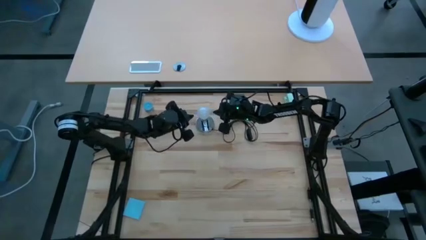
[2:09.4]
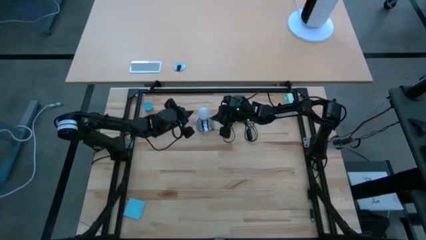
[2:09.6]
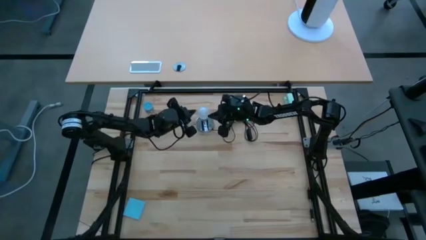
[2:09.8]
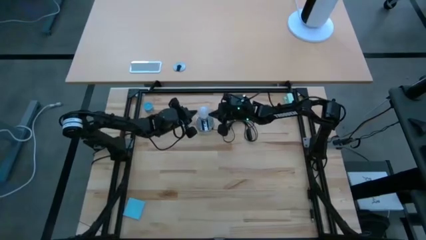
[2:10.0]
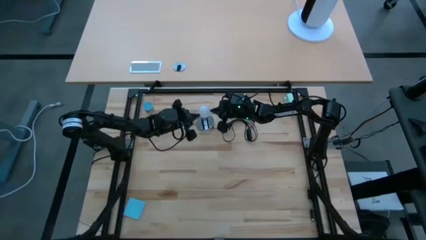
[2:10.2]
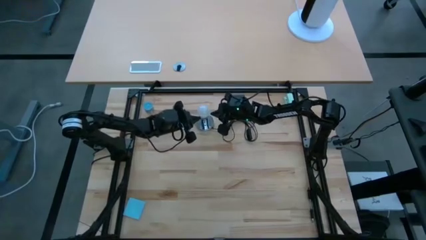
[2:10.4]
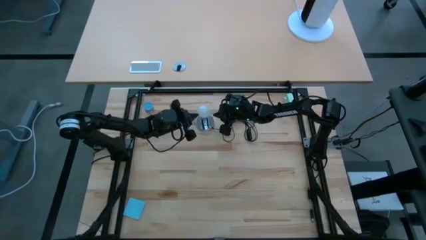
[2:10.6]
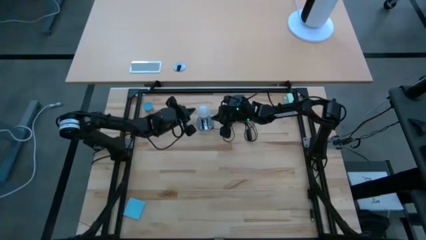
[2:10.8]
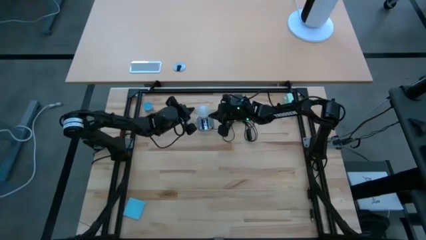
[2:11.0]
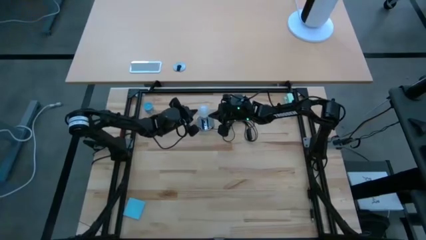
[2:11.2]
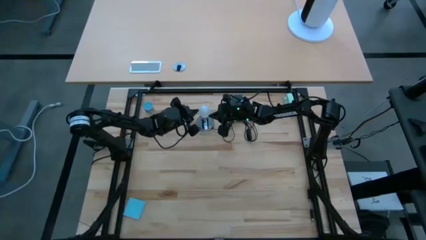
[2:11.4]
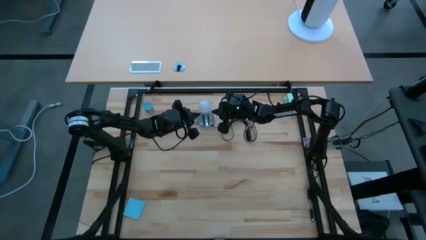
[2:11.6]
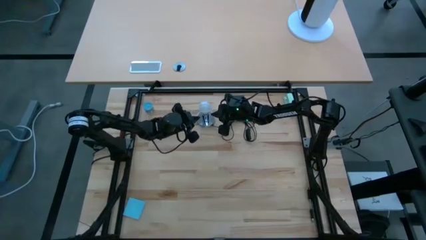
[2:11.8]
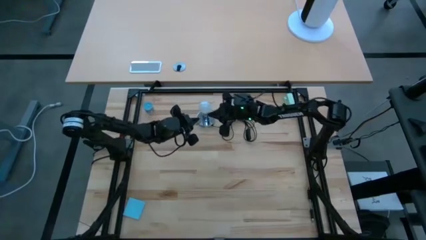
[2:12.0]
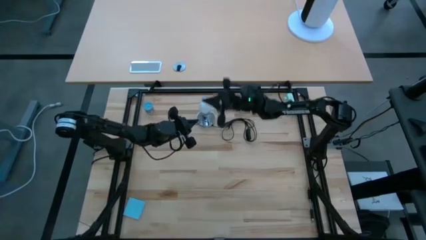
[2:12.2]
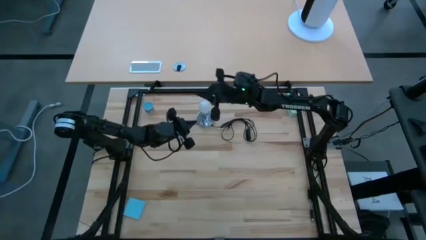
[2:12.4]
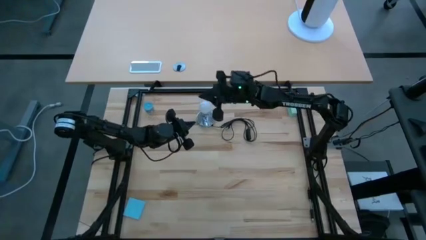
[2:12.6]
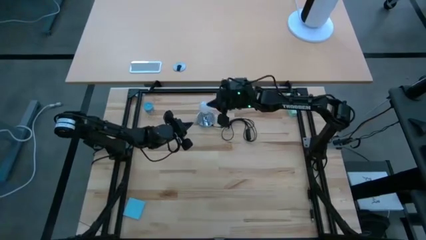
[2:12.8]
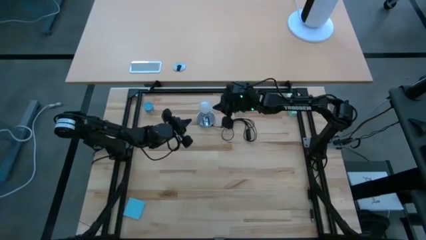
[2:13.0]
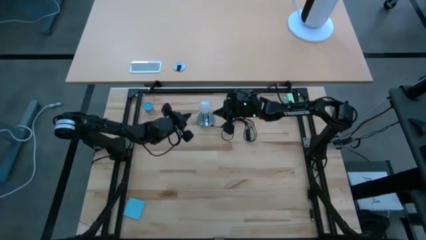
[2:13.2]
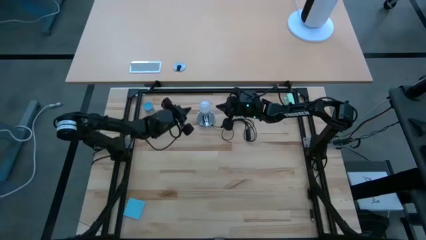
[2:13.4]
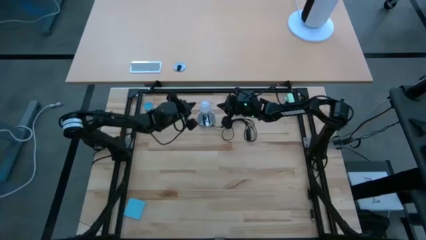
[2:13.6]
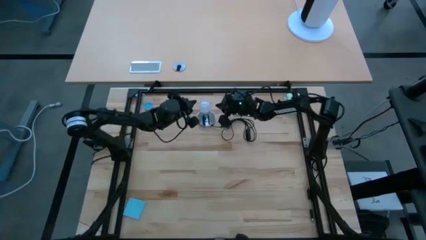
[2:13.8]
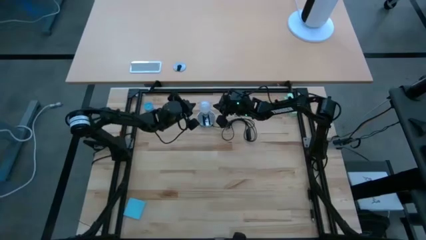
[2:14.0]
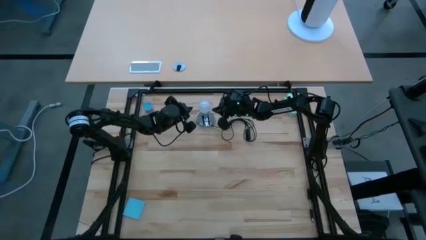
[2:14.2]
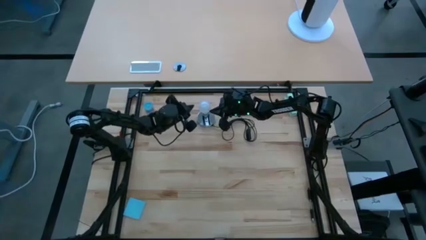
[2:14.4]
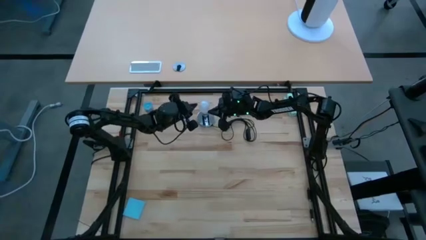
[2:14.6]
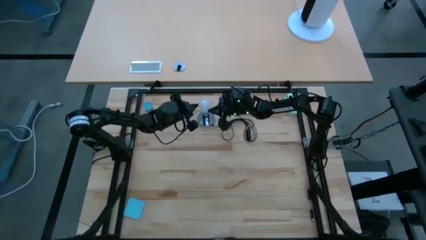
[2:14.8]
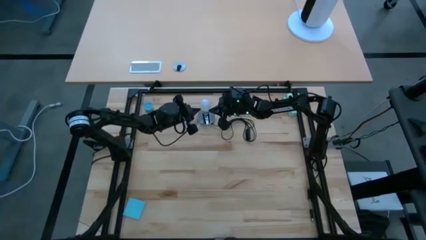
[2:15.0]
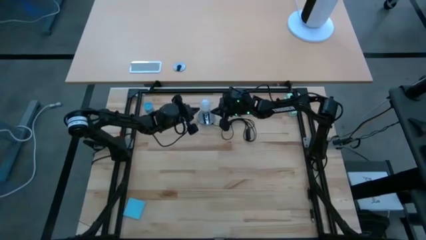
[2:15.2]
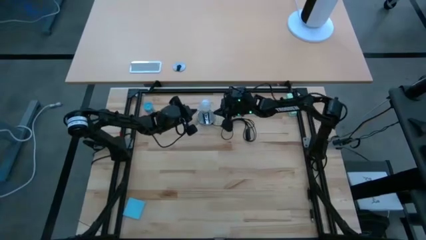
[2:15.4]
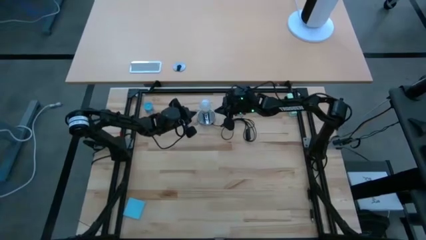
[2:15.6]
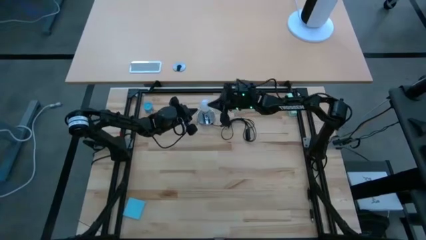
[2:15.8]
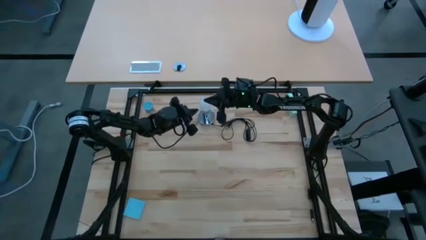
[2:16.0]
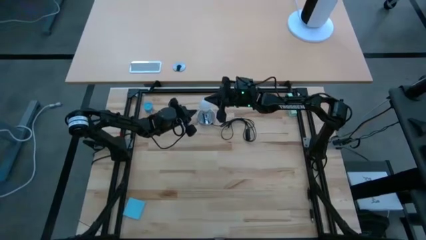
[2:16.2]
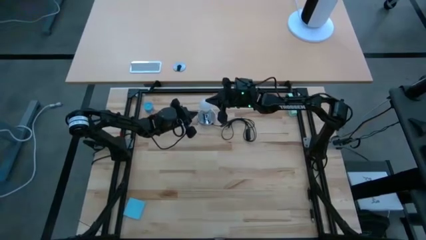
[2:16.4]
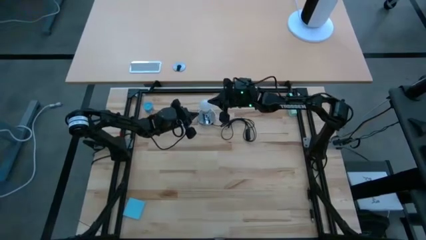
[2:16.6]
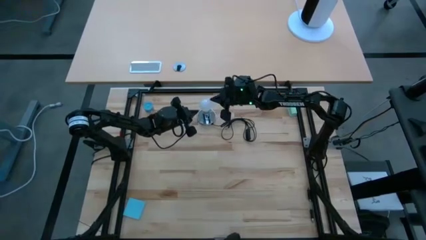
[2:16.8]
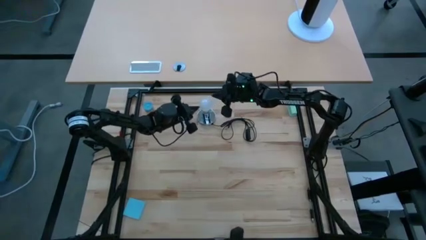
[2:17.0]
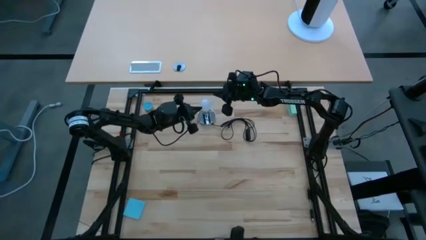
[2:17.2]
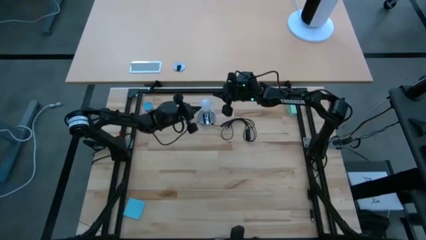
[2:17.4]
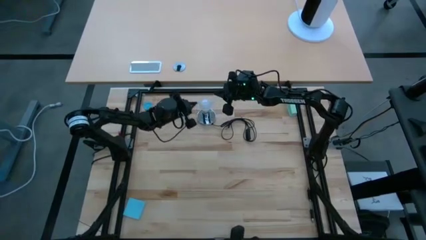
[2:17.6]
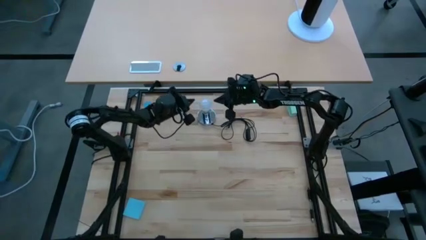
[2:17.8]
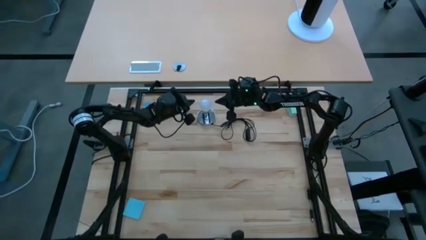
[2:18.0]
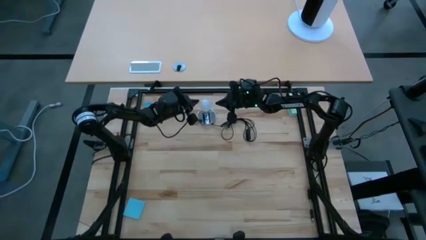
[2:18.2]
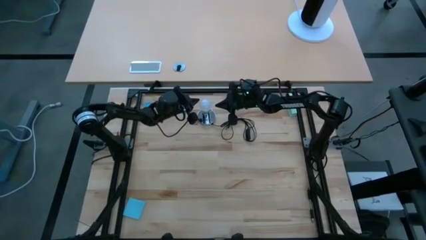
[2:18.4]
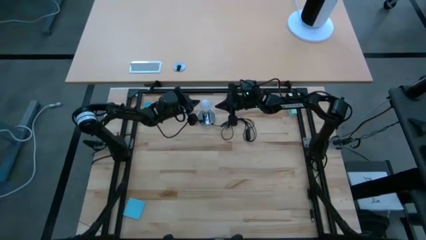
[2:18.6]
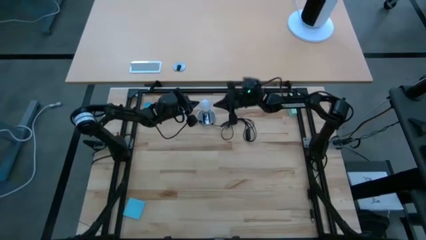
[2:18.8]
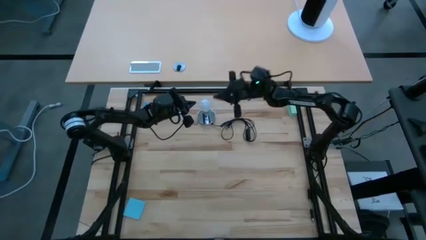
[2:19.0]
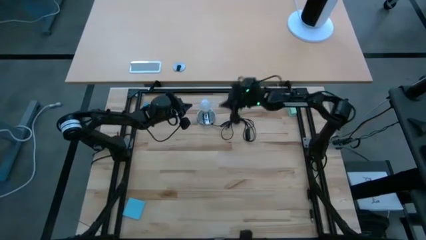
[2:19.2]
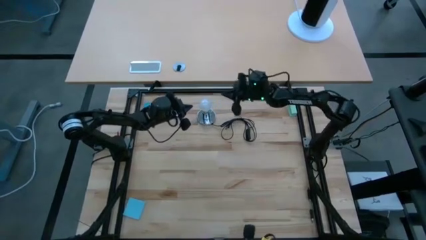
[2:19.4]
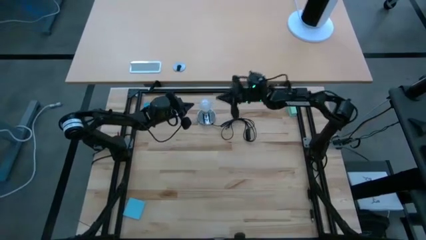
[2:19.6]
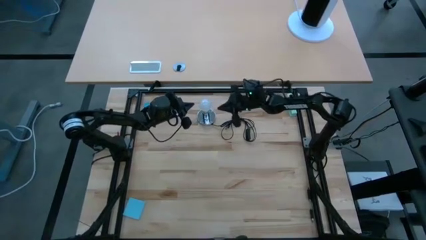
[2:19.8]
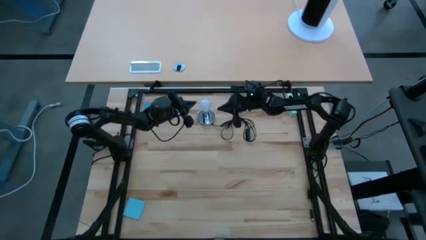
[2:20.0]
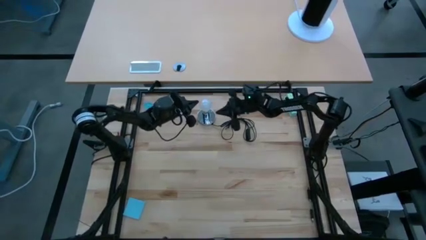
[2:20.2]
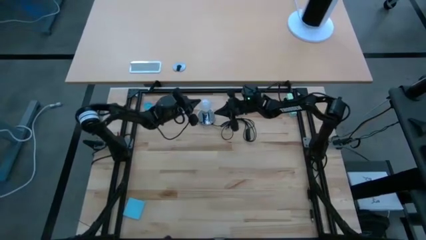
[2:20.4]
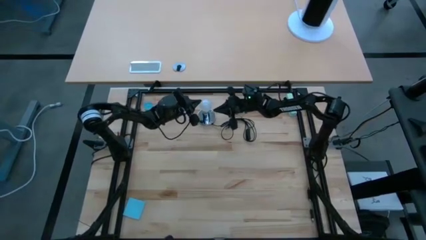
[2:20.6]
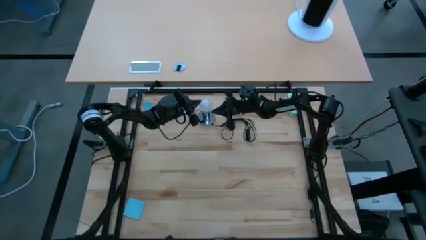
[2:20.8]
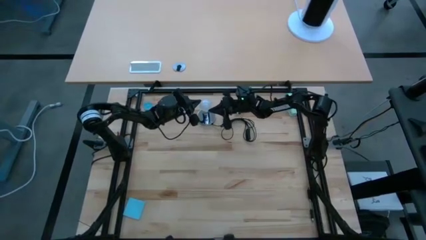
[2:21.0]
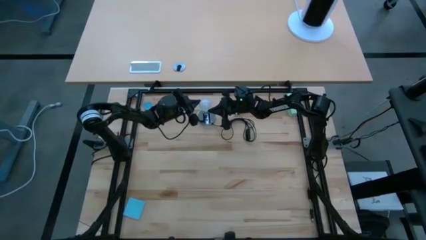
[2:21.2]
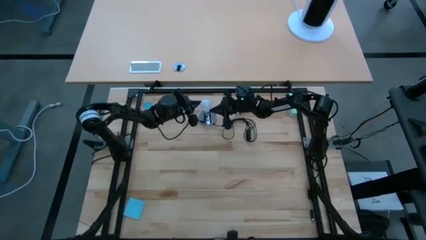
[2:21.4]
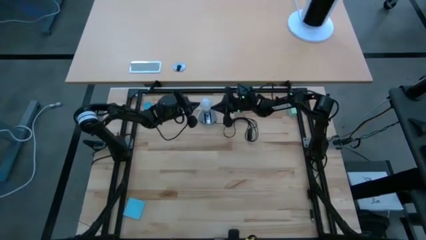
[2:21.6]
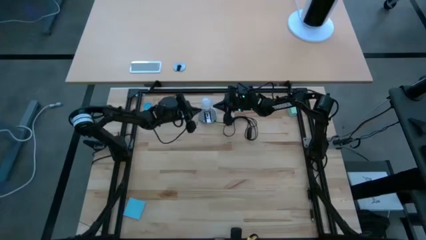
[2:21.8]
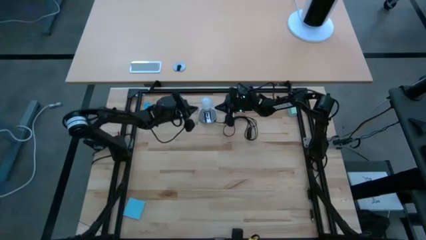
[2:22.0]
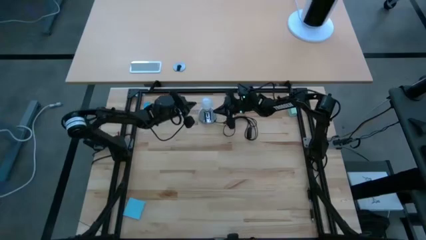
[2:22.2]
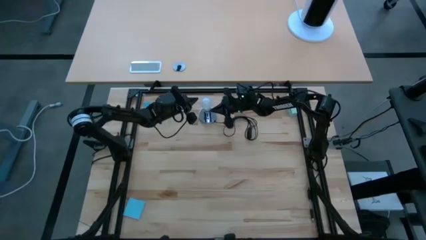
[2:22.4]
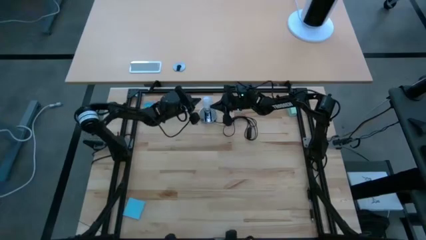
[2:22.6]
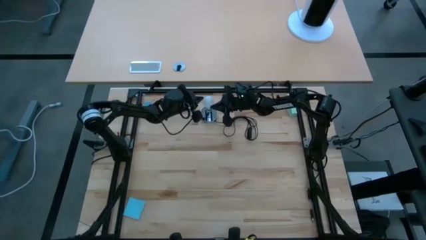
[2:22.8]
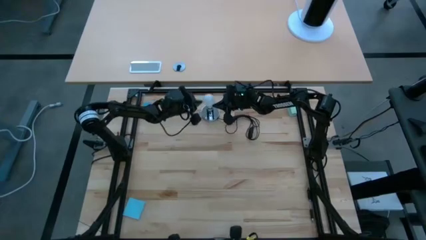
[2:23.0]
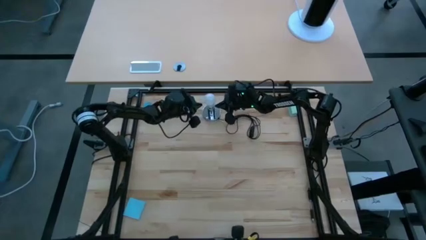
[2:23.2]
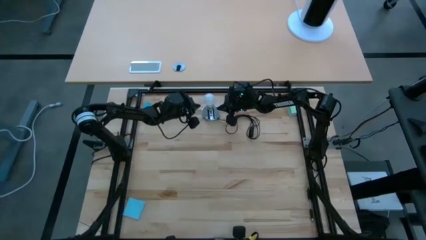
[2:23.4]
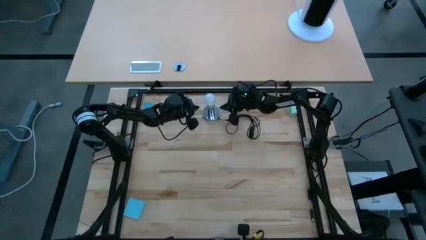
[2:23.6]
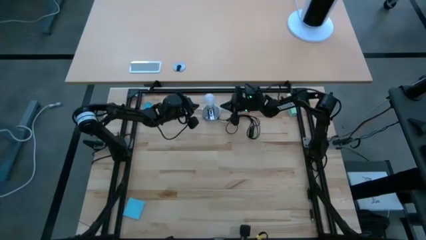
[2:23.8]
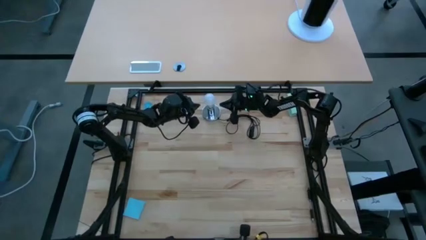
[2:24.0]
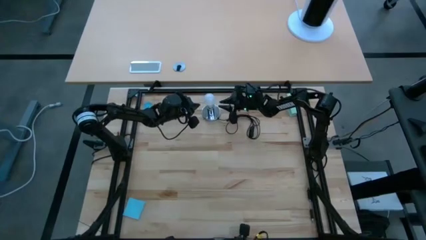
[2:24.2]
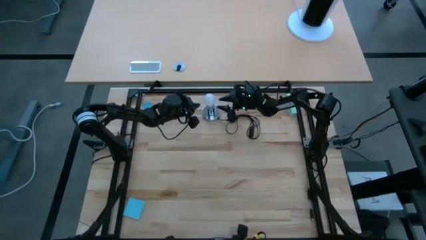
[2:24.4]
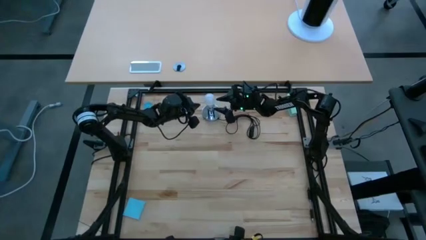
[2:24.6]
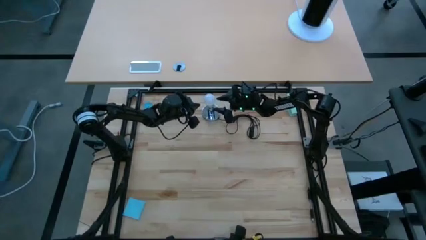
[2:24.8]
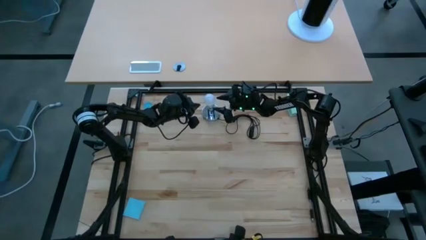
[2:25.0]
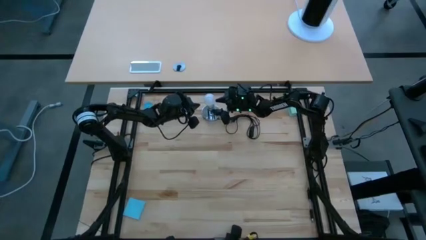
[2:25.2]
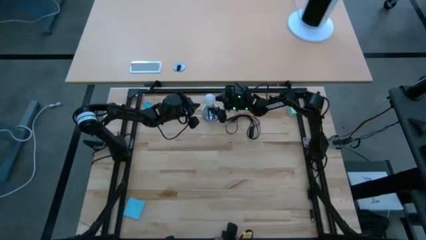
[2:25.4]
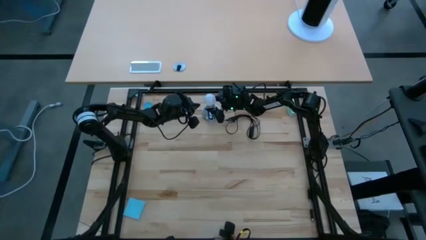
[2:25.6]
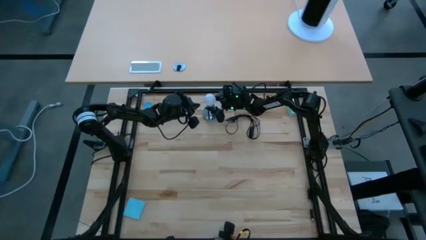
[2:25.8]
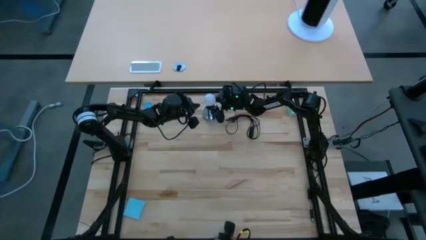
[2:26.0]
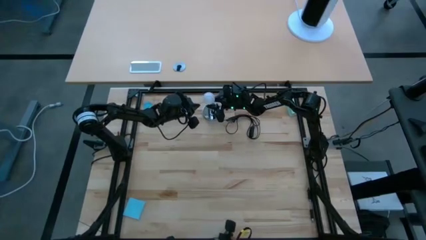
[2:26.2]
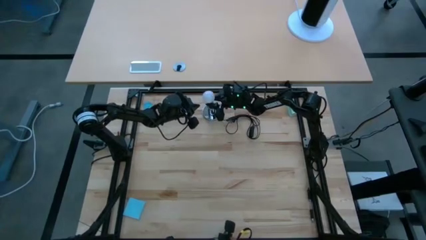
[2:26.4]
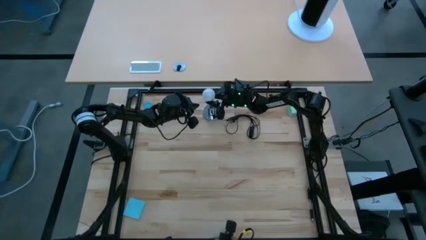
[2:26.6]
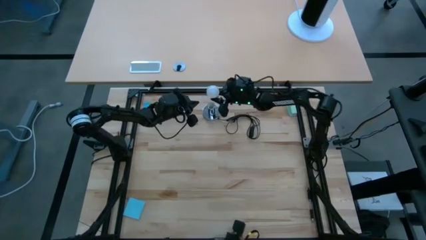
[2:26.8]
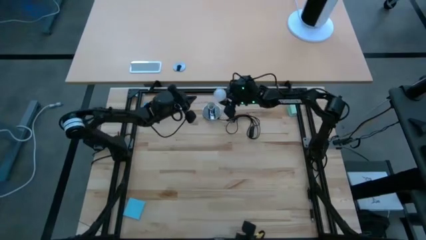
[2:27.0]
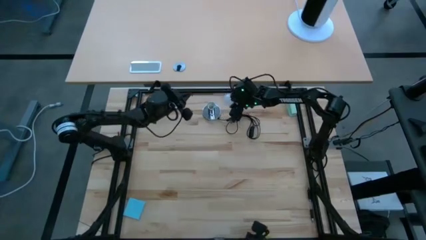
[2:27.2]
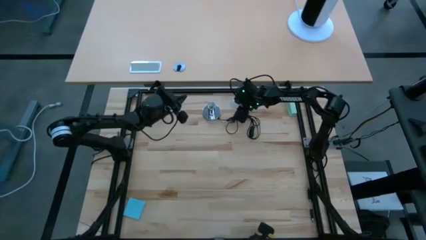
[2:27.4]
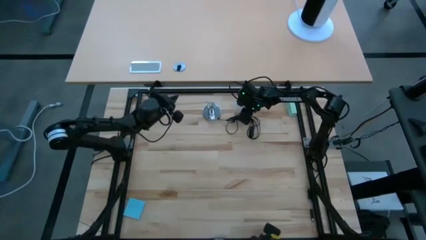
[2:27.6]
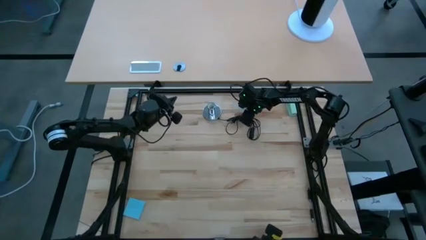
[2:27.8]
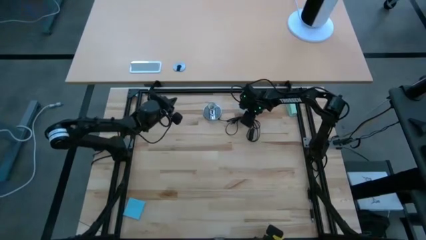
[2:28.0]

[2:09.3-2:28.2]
Task: Screw lightbulb
Remove the lightbulb from the lamp
